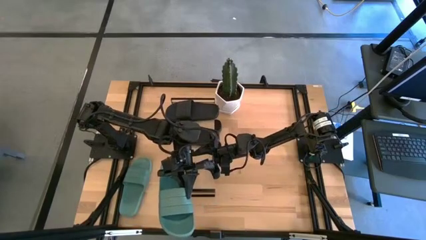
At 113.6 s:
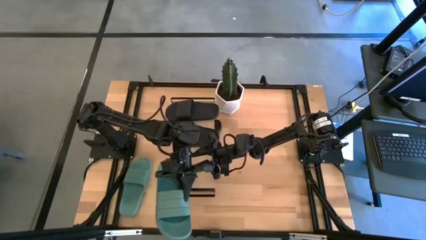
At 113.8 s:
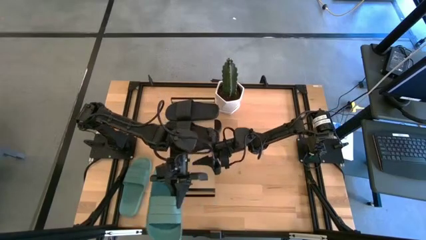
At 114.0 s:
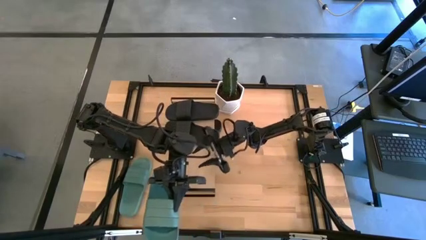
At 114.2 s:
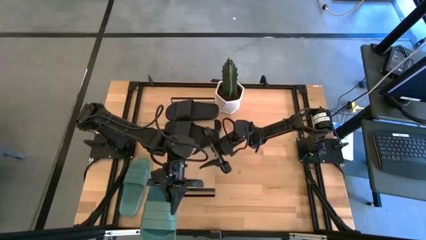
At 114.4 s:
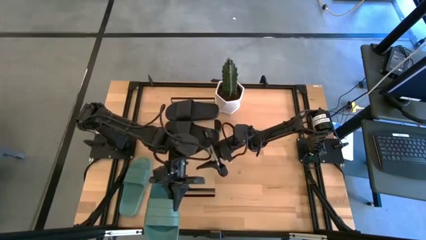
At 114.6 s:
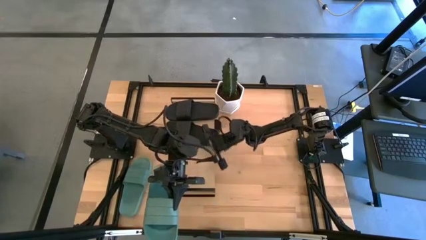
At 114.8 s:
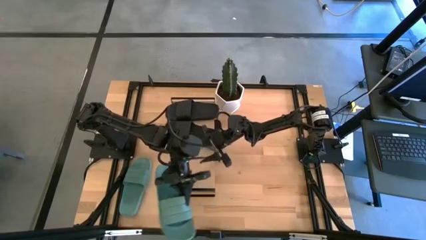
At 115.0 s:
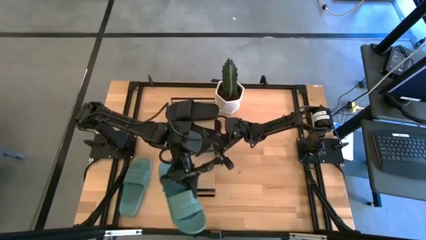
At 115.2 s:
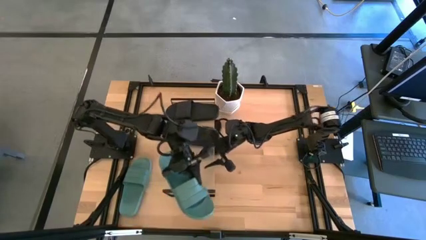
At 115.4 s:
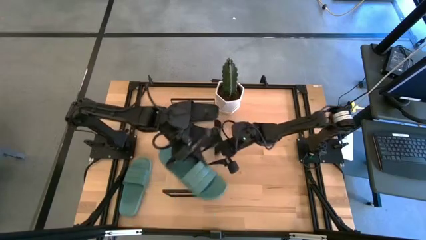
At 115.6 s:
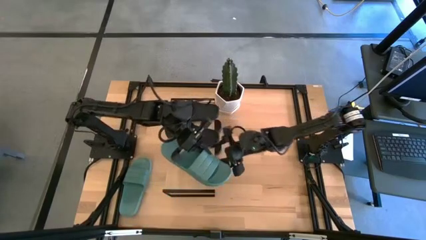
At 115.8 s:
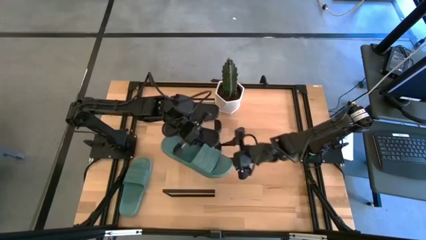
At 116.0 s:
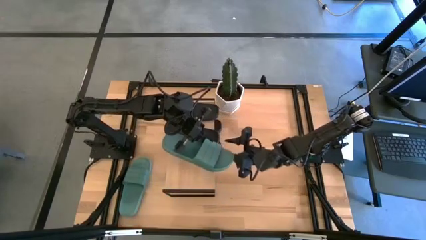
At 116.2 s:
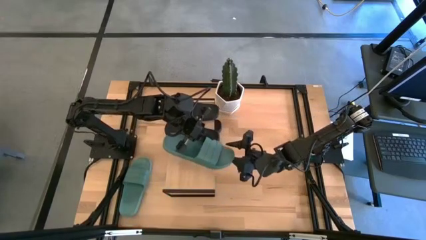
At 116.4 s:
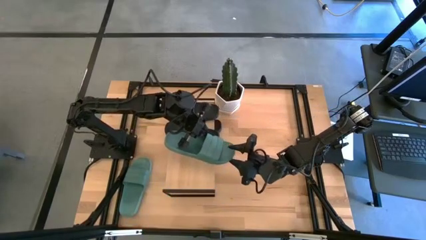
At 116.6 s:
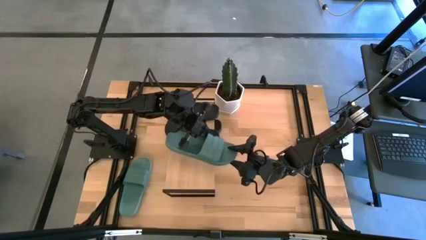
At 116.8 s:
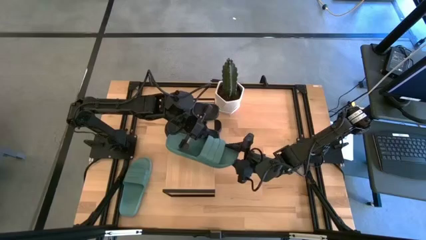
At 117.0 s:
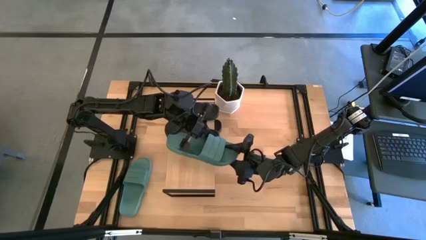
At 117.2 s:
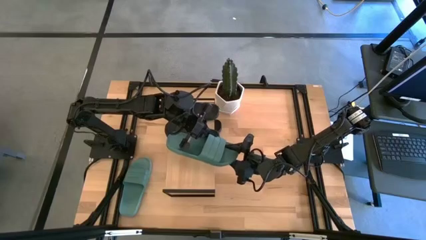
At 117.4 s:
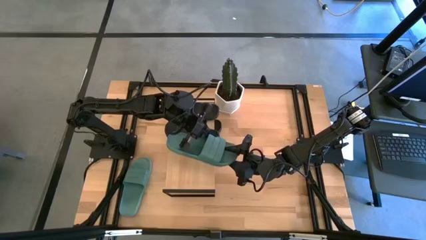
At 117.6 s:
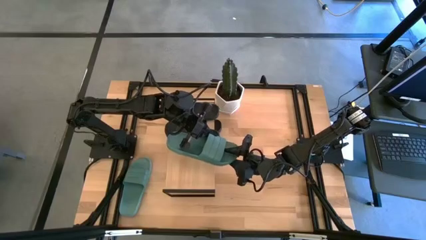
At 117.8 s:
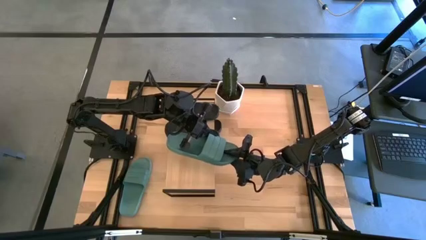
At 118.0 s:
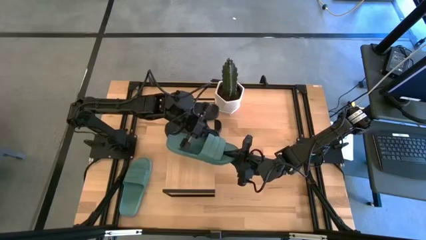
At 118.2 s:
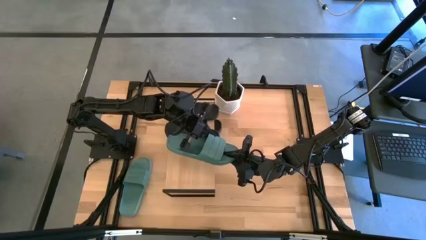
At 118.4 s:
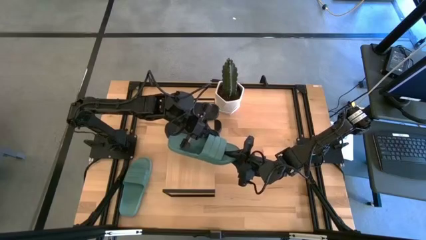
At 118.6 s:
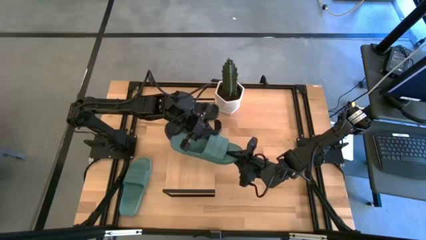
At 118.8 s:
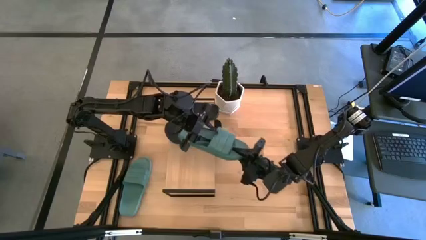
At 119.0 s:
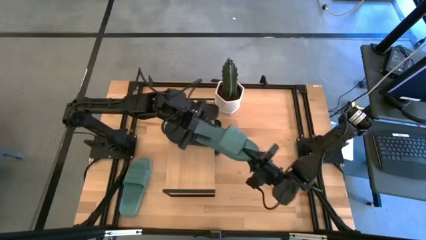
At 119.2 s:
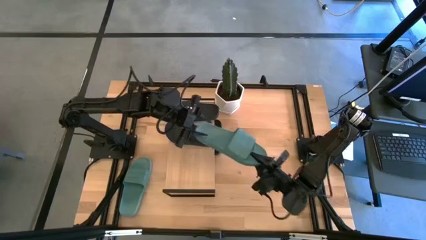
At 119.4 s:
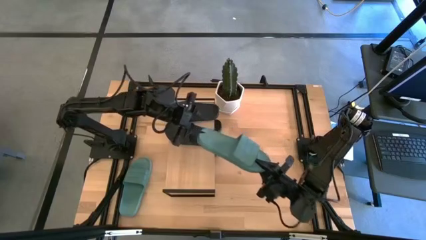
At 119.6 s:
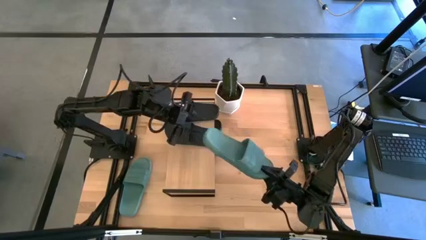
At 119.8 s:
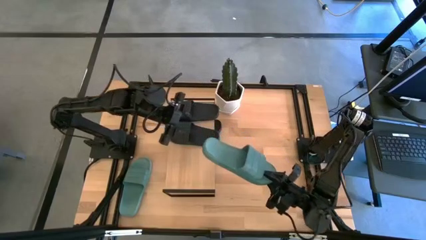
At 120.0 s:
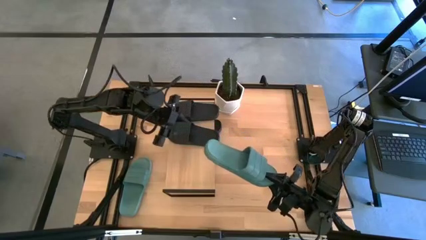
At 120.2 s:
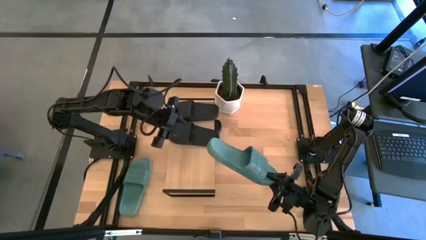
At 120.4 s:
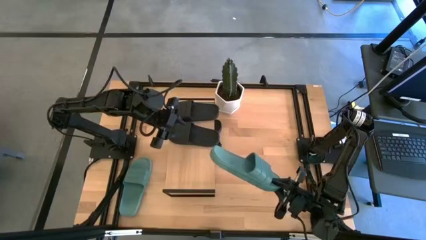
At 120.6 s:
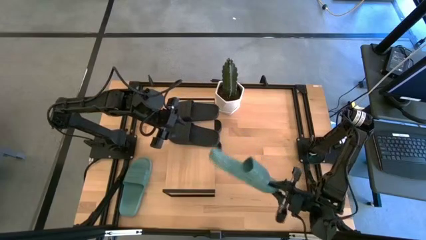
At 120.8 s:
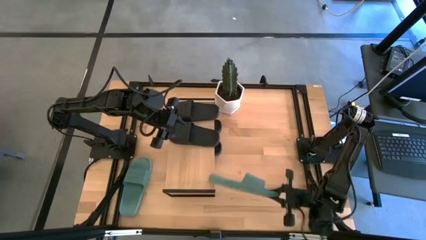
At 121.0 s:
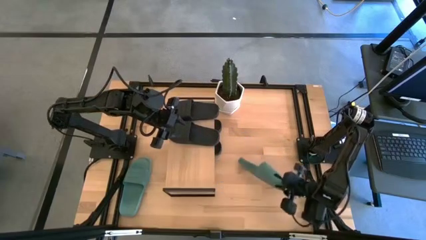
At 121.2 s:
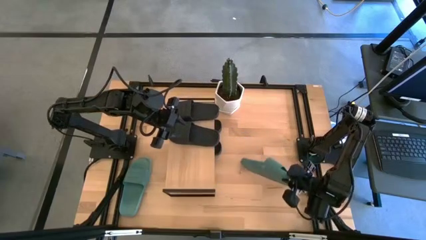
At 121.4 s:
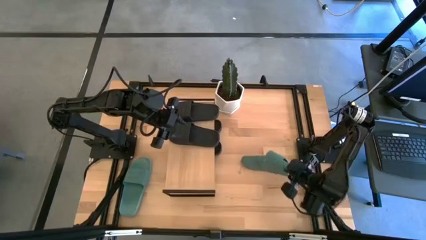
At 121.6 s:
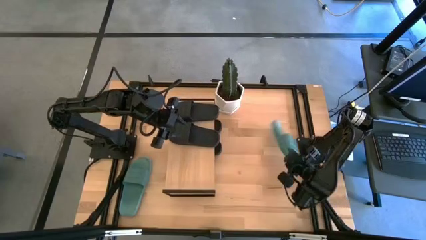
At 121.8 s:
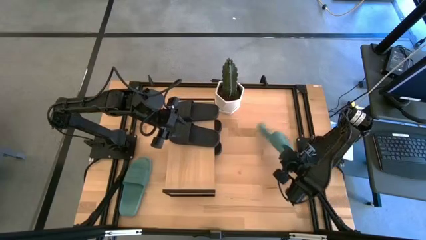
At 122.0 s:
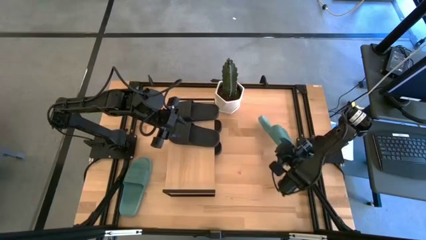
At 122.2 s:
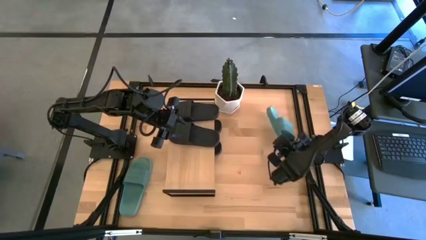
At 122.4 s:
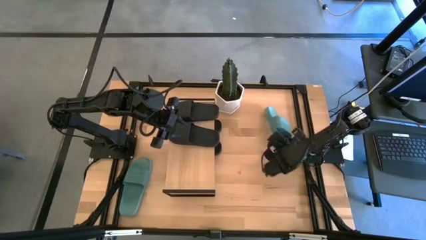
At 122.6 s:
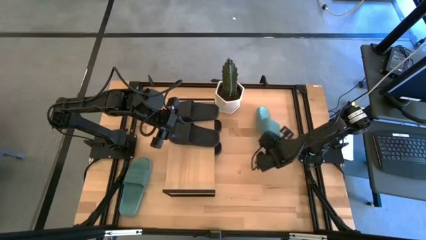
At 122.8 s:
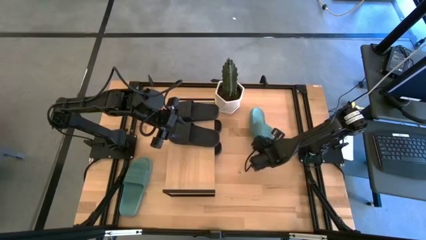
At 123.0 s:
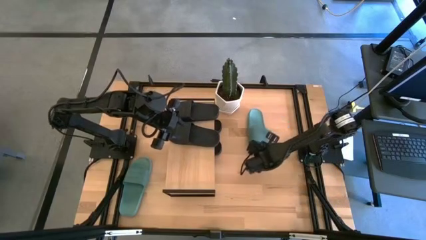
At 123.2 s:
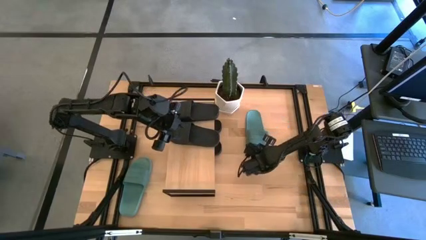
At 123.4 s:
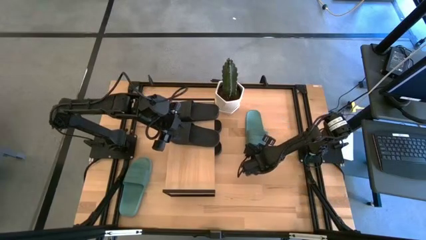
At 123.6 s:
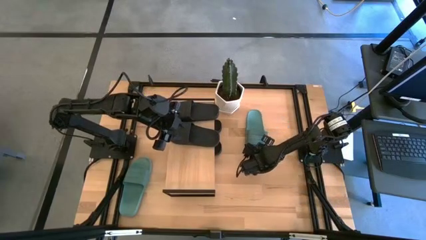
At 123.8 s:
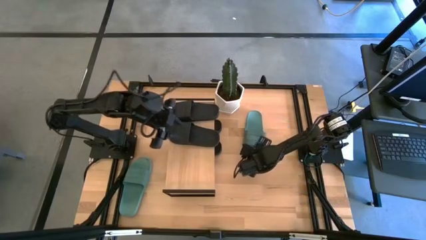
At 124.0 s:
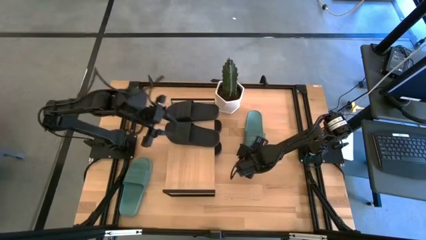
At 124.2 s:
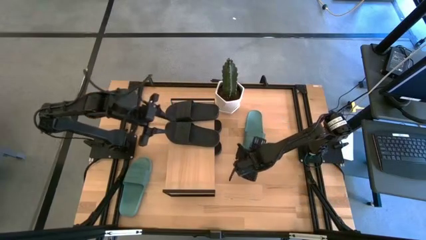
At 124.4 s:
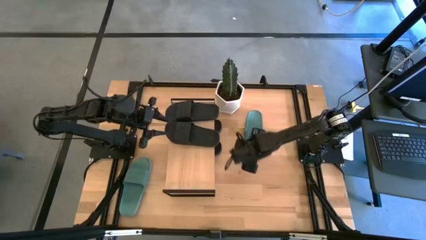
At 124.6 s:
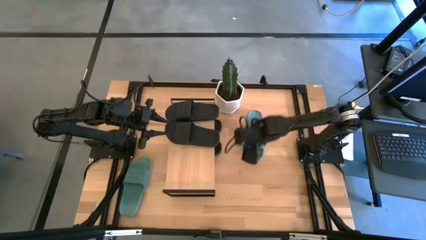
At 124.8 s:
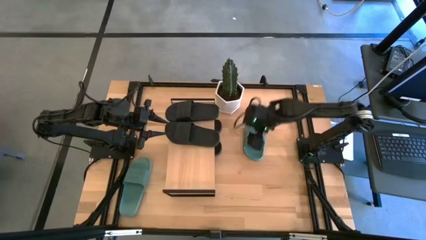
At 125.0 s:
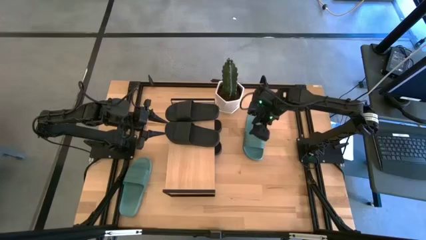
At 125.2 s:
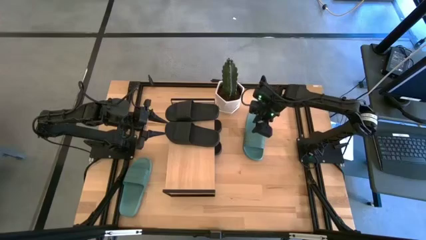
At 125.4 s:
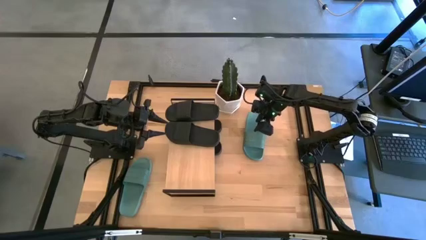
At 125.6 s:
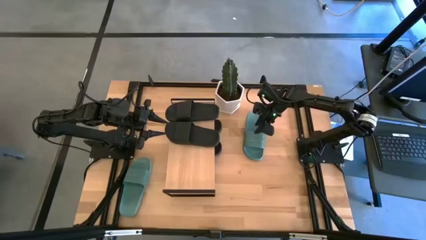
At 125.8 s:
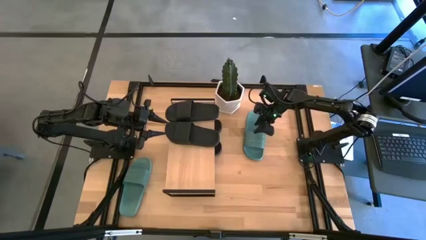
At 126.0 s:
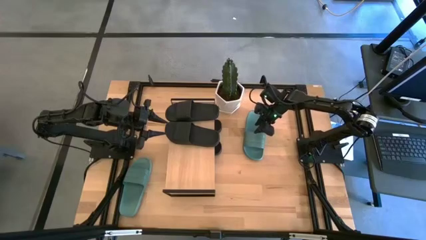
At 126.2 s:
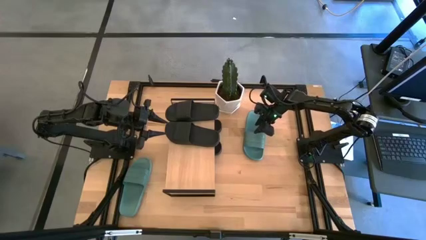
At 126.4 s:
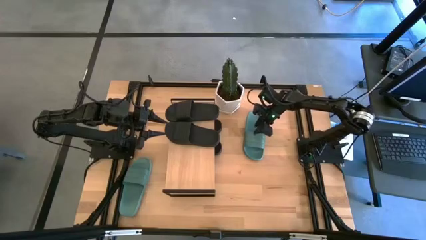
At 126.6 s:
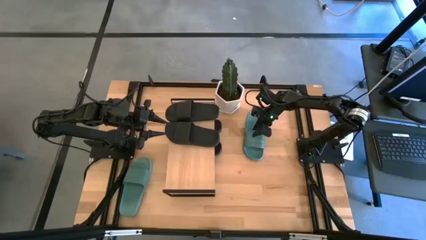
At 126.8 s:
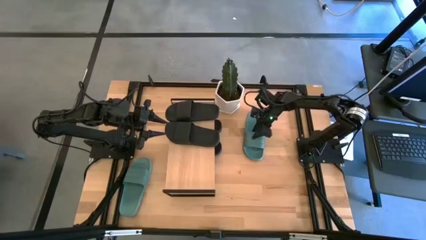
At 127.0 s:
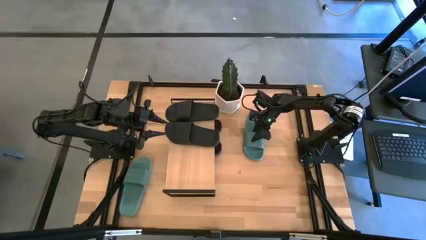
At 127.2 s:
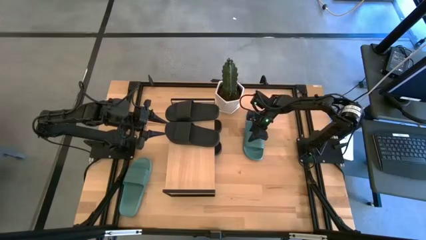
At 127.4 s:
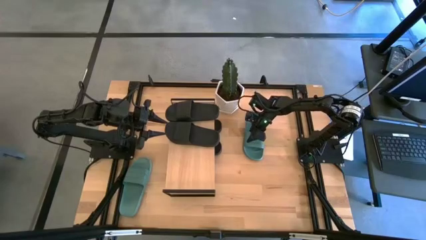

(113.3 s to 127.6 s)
Task: Pick and place slides into the shelf
Put the green slides under the shelf
